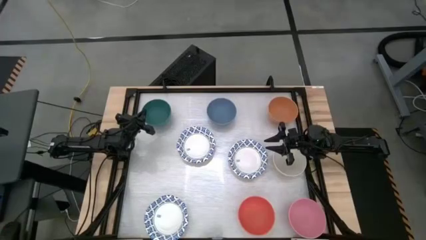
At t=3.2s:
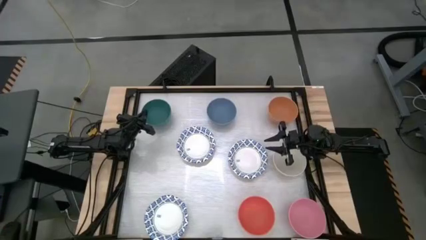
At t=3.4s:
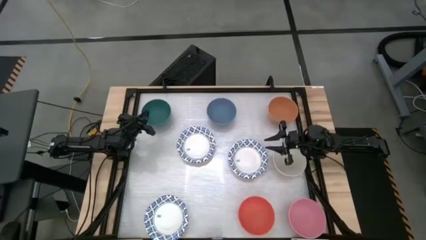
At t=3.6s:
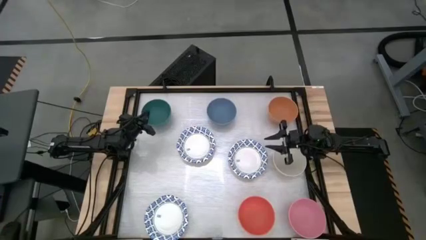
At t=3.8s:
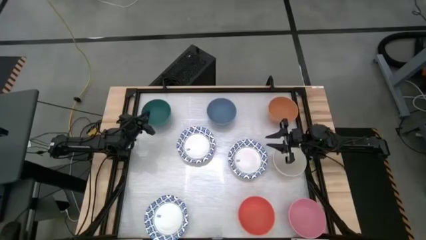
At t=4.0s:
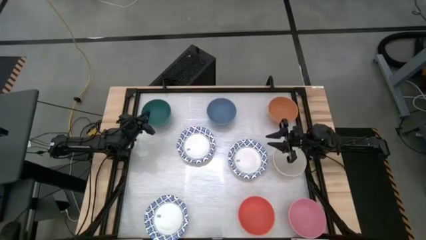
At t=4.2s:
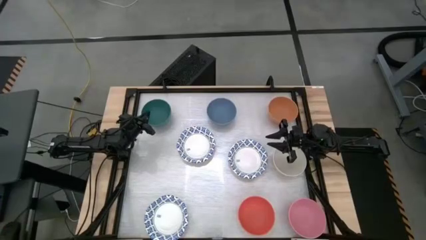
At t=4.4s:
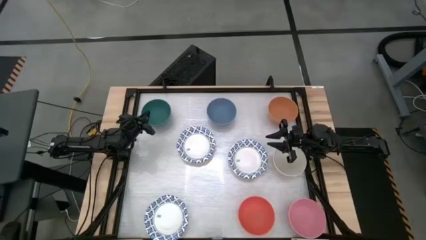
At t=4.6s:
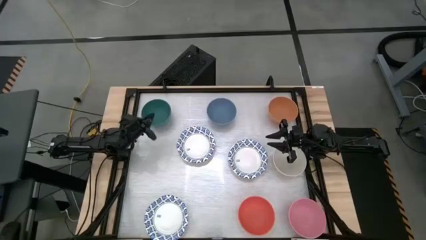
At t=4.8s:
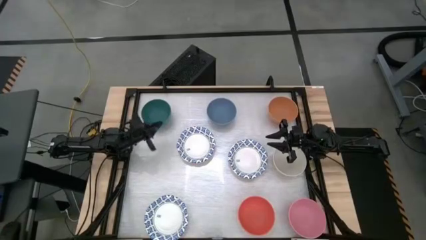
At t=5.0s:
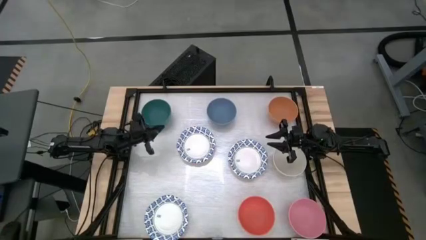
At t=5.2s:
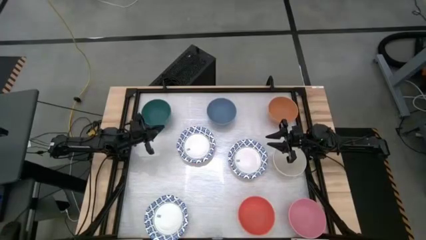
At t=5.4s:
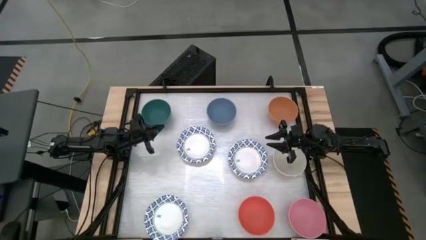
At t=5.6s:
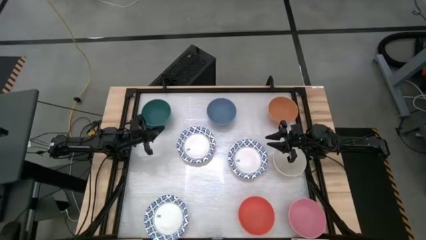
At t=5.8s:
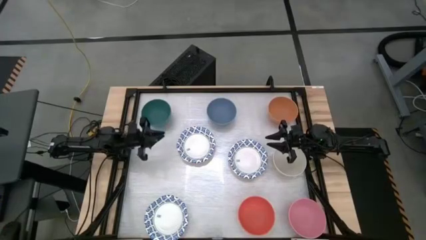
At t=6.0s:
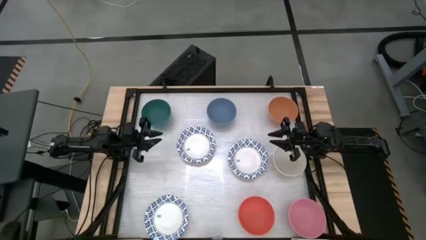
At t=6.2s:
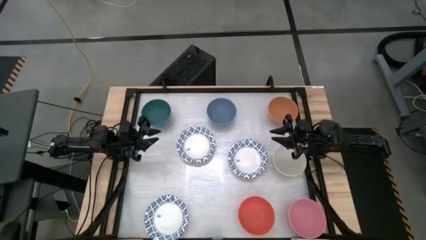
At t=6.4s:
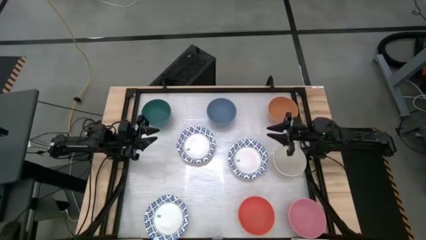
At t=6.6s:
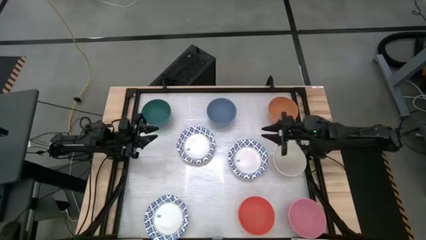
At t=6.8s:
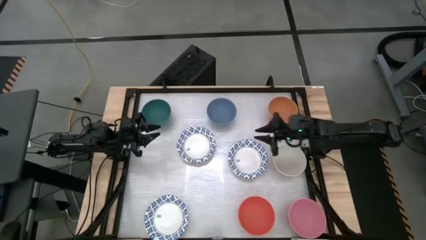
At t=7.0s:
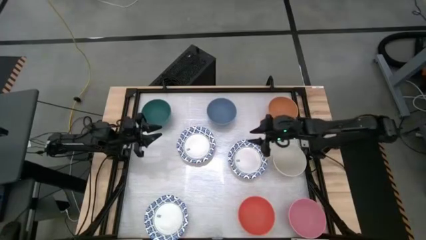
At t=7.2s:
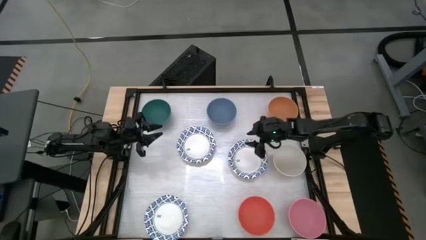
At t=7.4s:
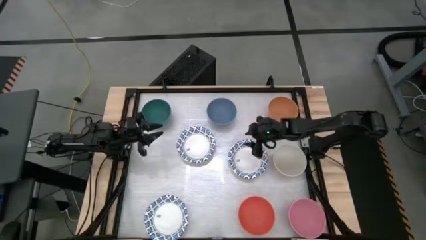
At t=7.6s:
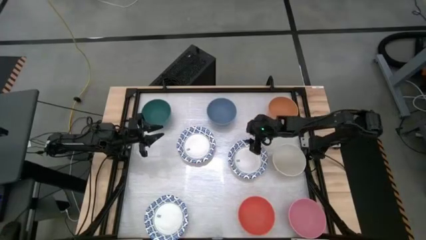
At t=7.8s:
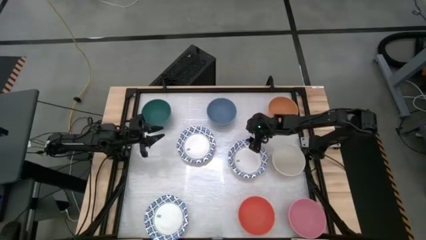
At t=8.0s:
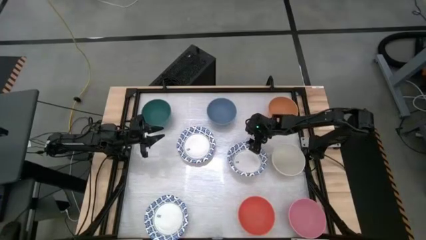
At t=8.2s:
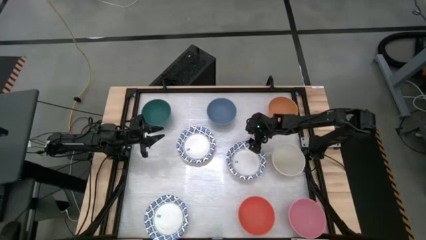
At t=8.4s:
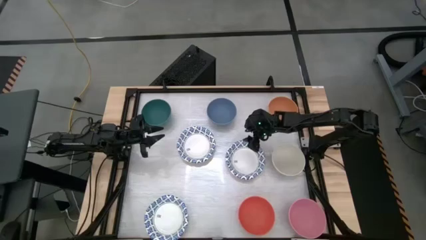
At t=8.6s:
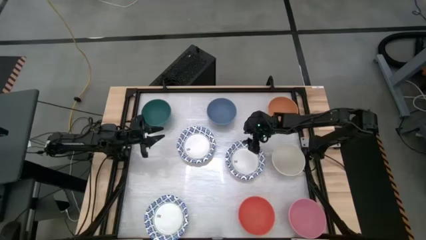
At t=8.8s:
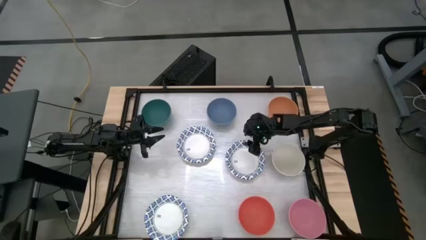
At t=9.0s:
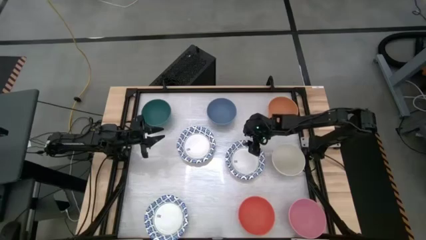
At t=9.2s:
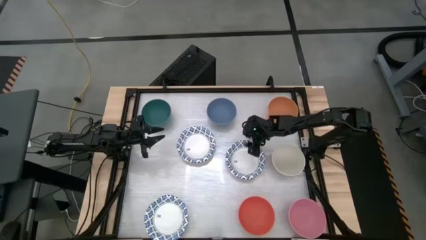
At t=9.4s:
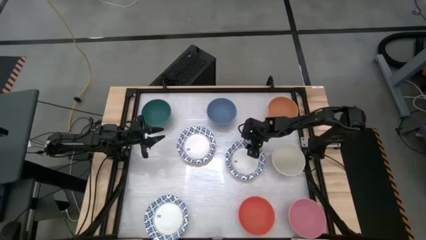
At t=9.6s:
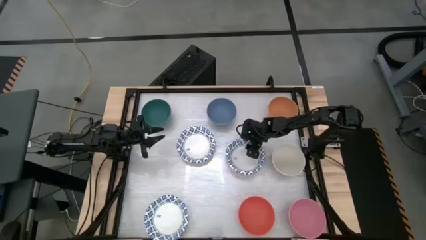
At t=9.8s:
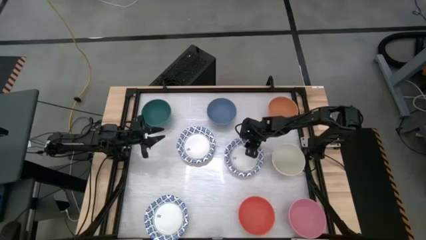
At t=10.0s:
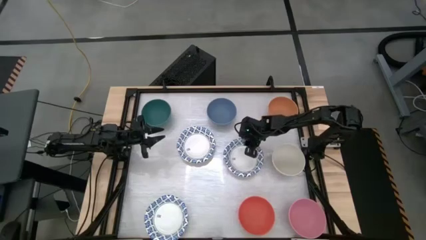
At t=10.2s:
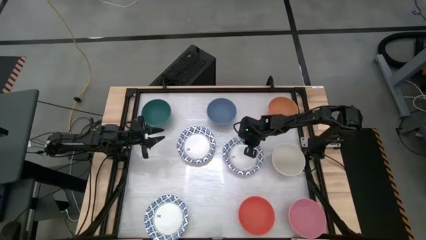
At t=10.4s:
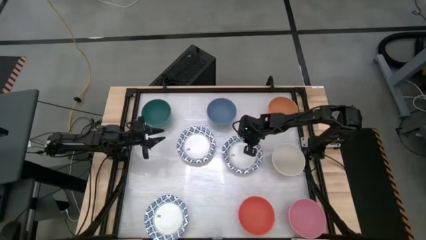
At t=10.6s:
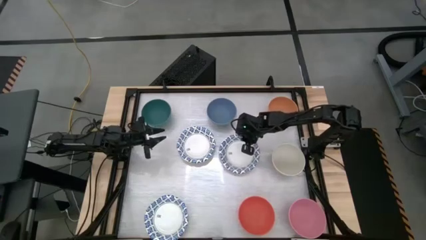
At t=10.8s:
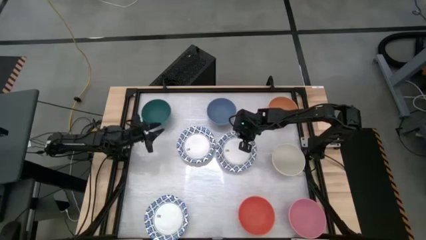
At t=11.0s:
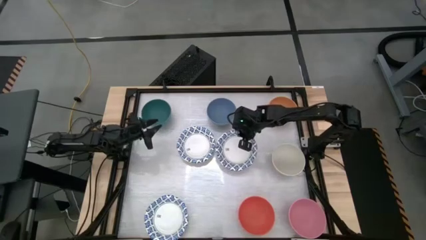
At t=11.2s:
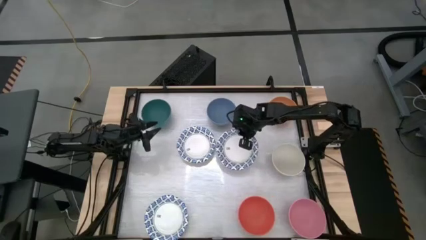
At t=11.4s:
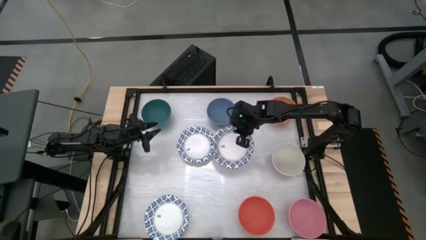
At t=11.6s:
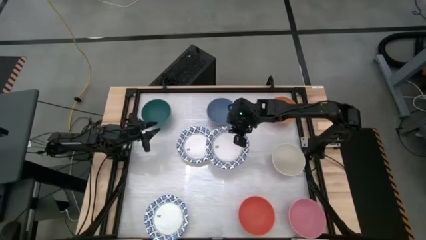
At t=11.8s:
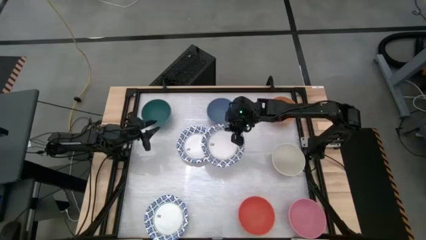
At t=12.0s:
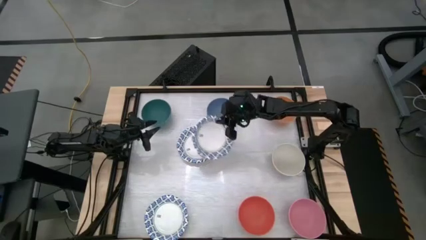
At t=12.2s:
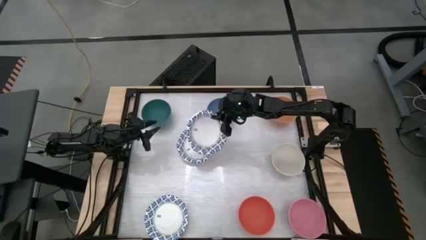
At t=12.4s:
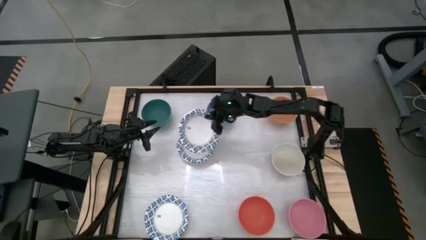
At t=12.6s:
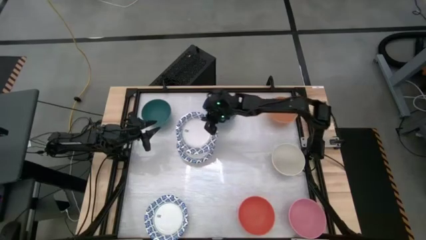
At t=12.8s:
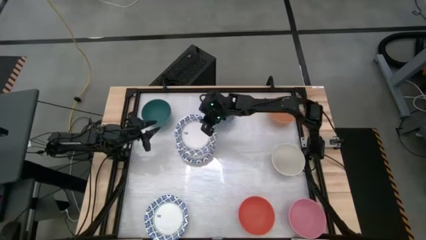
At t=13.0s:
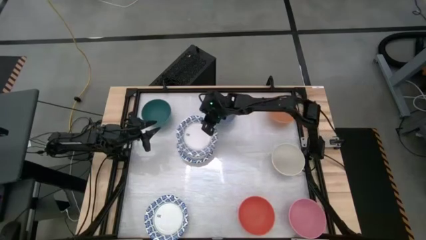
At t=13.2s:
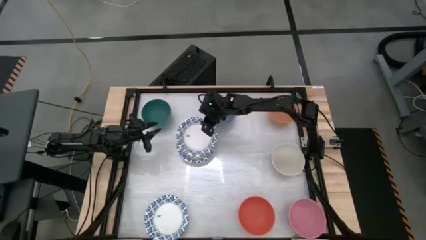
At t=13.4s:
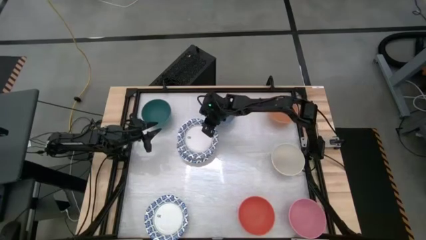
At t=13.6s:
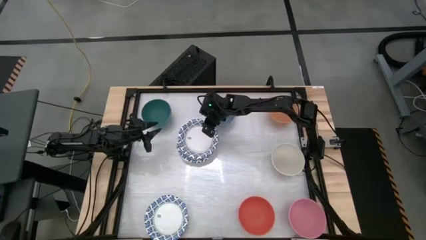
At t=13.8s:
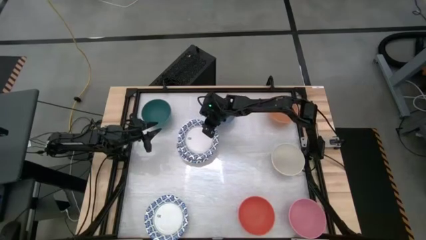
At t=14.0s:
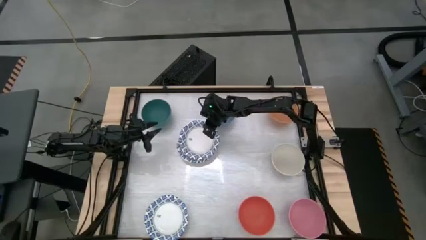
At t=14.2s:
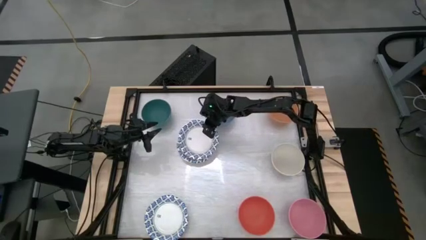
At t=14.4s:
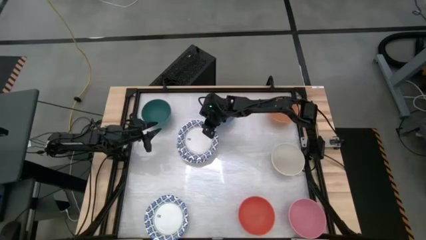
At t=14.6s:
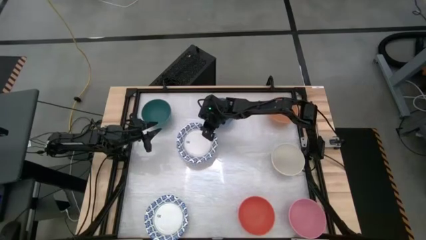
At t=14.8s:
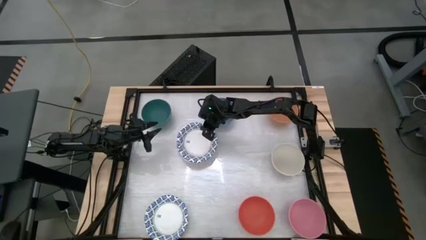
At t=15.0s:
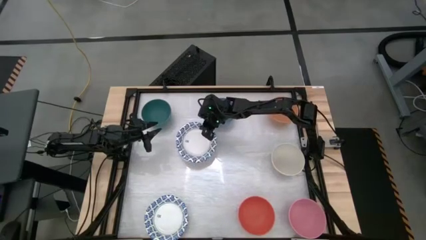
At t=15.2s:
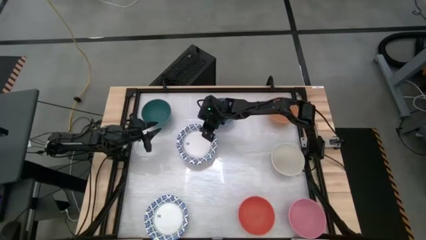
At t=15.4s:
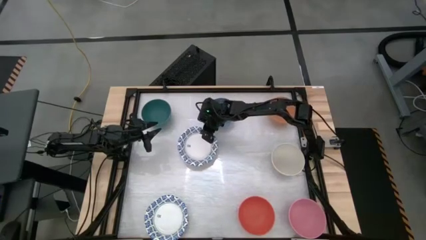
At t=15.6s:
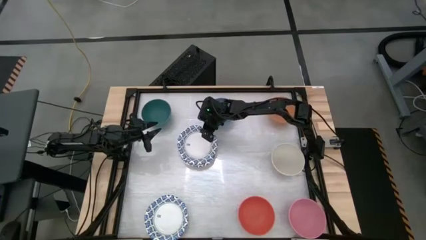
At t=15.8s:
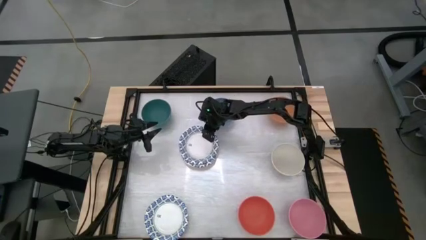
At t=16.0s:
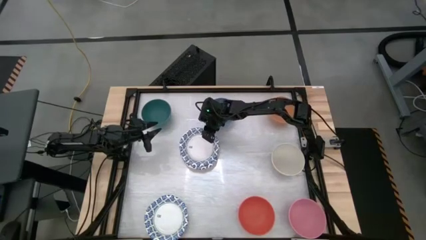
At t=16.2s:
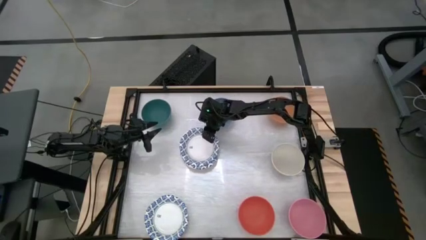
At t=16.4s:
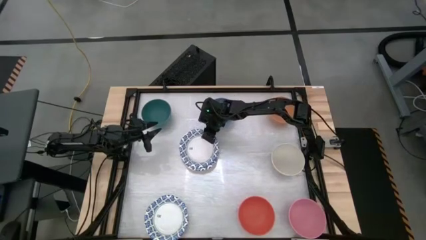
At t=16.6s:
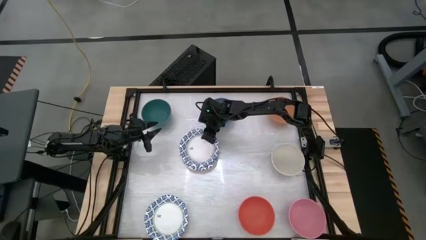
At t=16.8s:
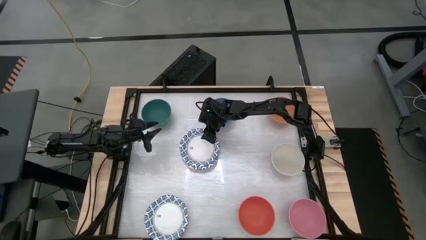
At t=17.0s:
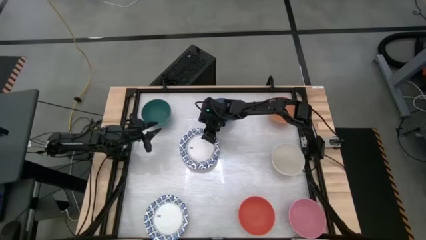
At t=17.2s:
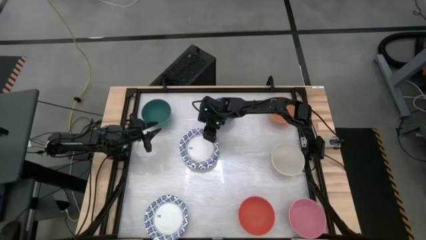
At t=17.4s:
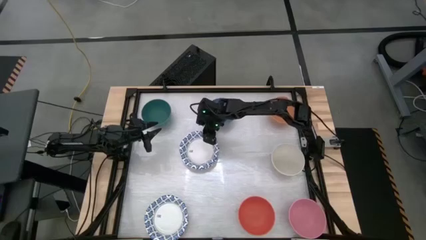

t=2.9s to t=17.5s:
Stack the top-right blue patterned bowl on top of the top-left blue patterned bowl
